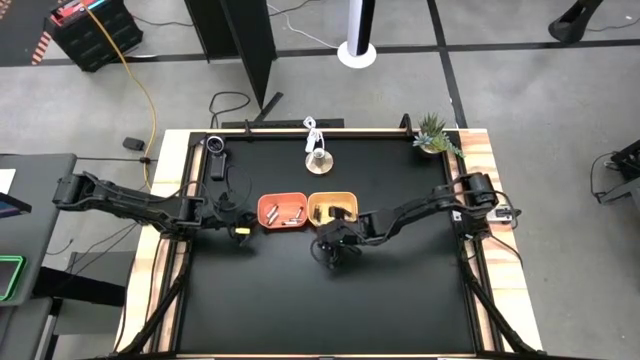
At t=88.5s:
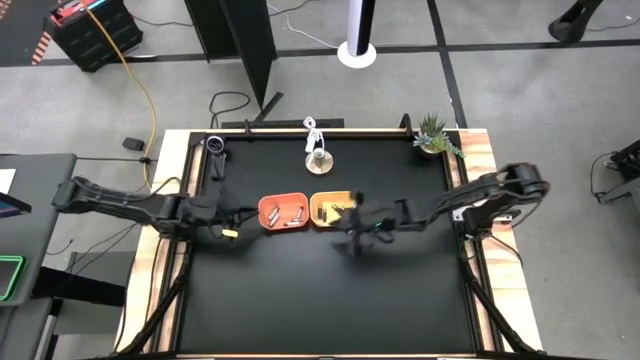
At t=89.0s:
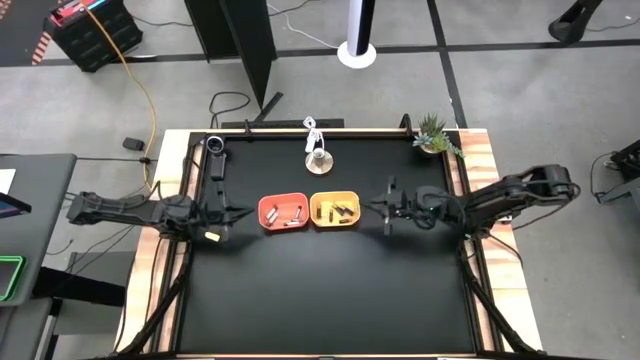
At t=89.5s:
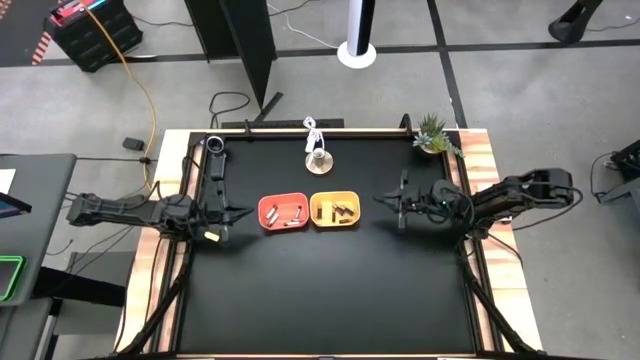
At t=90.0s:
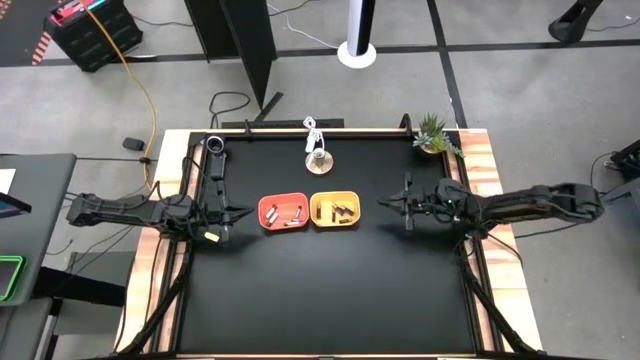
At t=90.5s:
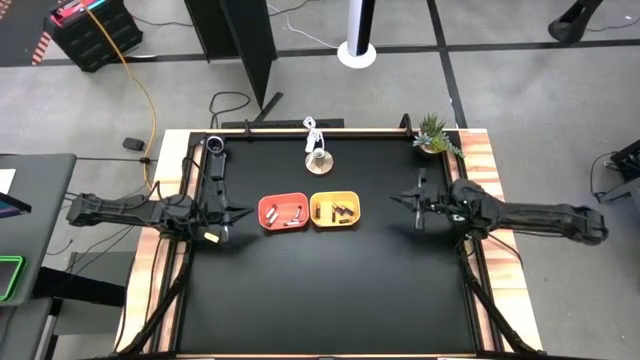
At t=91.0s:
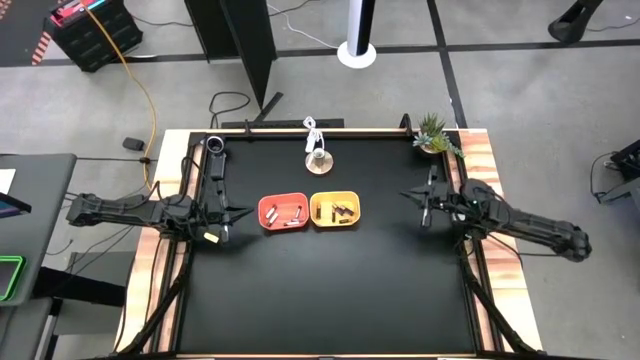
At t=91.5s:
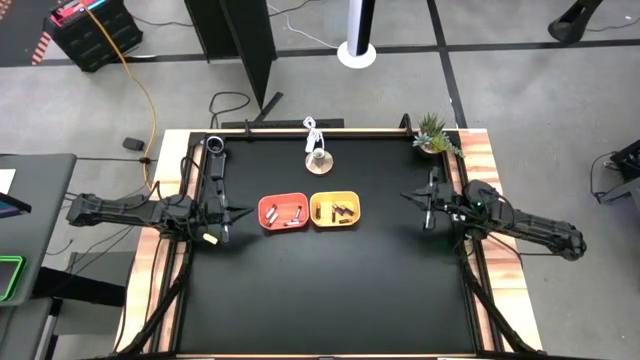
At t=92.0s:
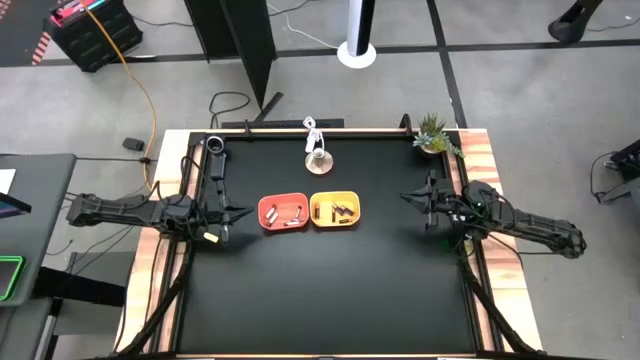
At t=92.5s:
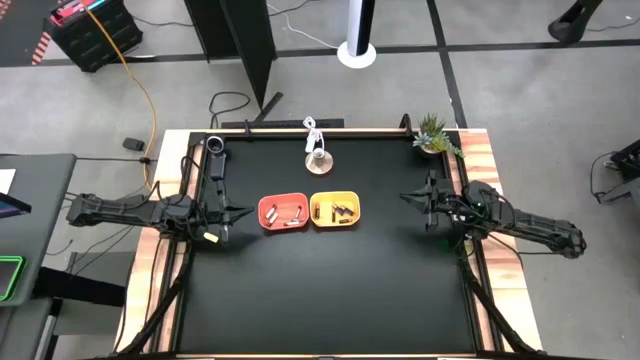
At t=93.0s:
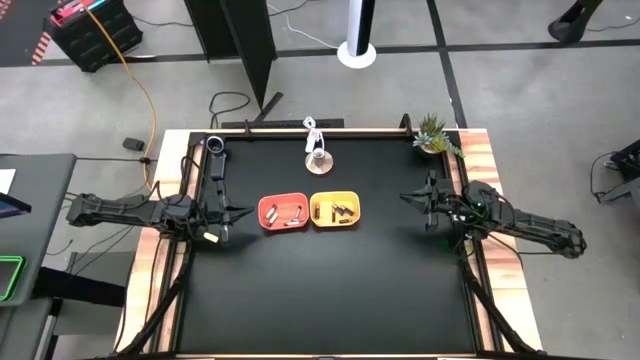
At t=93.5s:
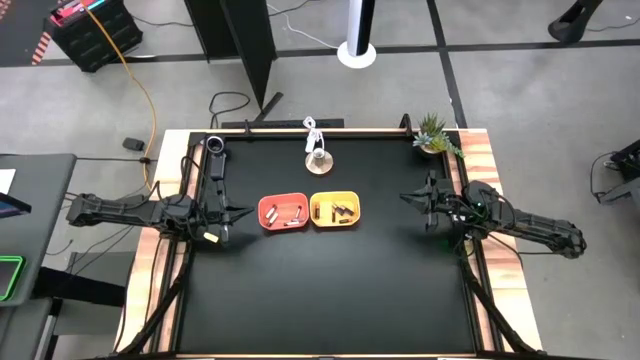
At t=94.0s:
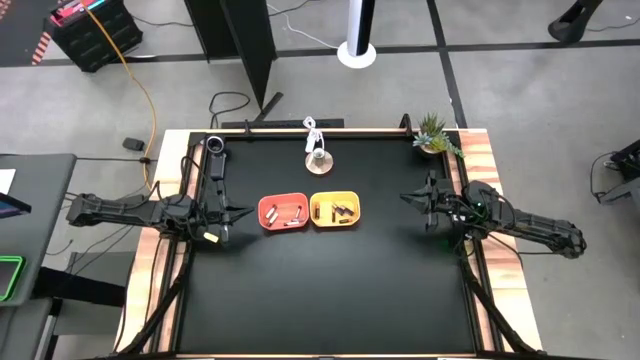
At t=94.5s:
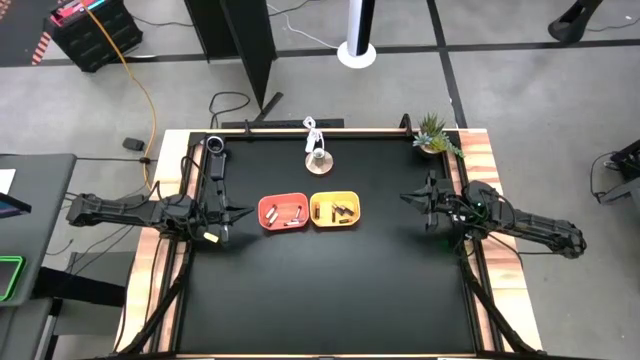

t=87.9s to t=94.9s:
Task: Sort batteries
Return to Home Position

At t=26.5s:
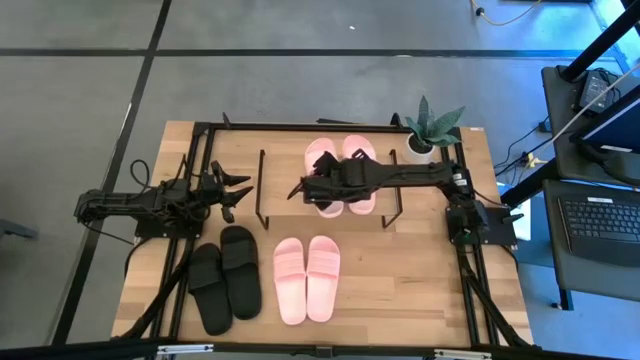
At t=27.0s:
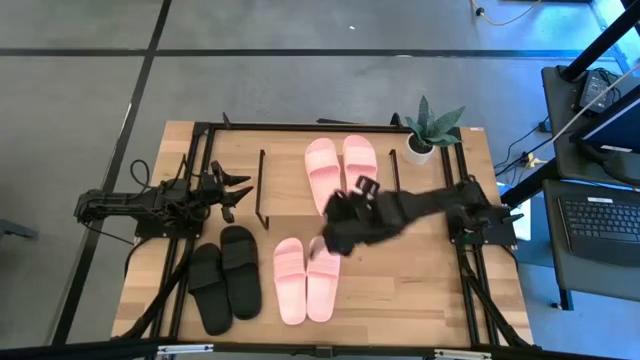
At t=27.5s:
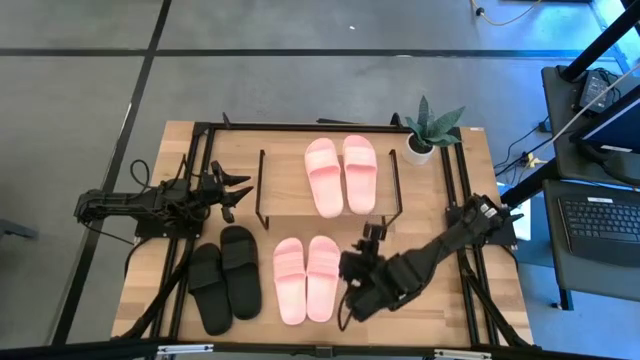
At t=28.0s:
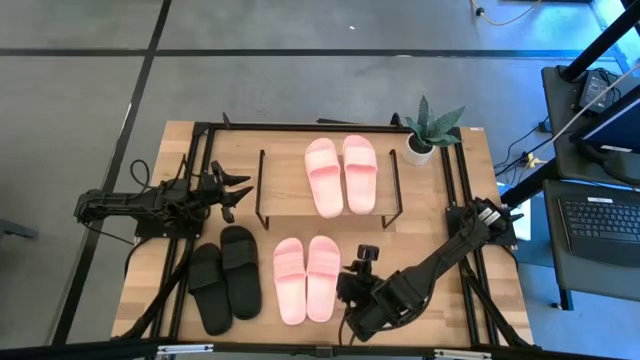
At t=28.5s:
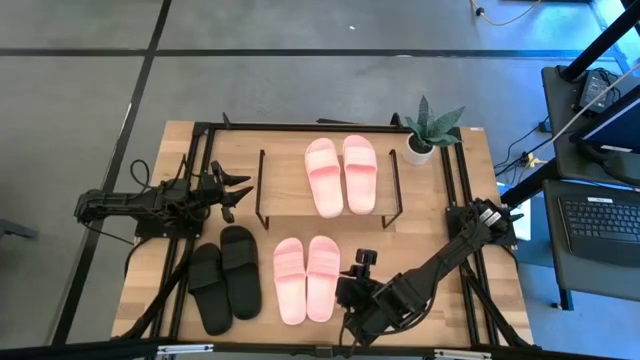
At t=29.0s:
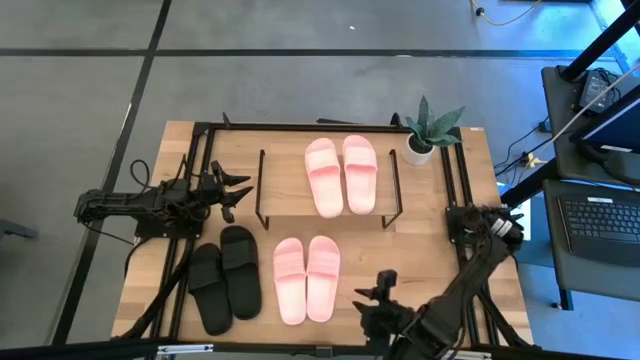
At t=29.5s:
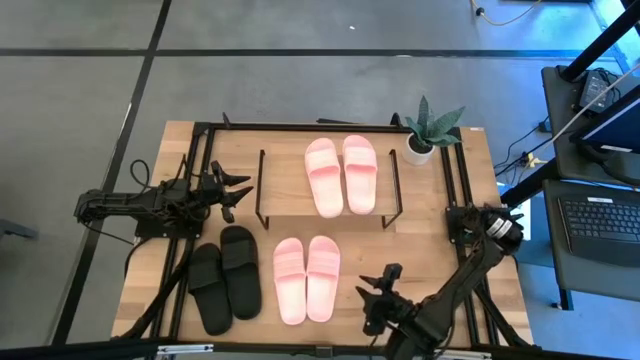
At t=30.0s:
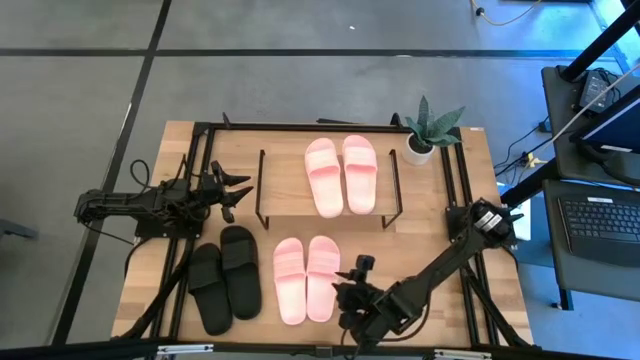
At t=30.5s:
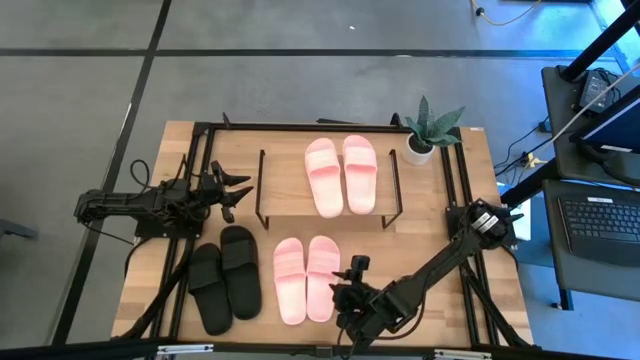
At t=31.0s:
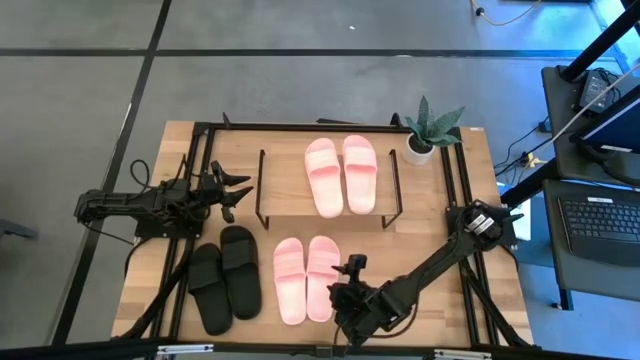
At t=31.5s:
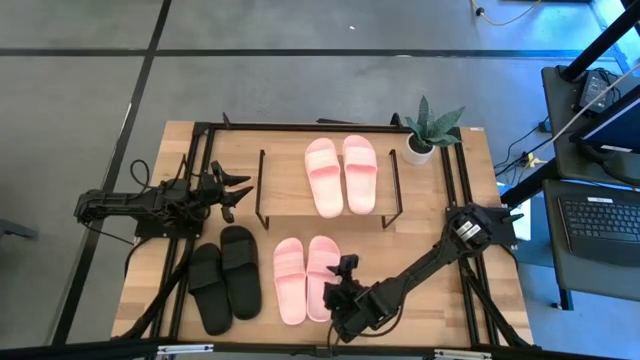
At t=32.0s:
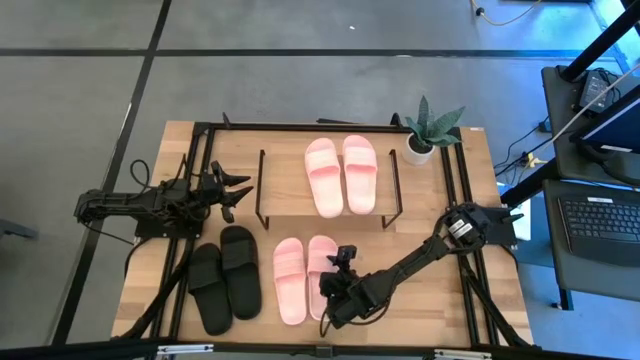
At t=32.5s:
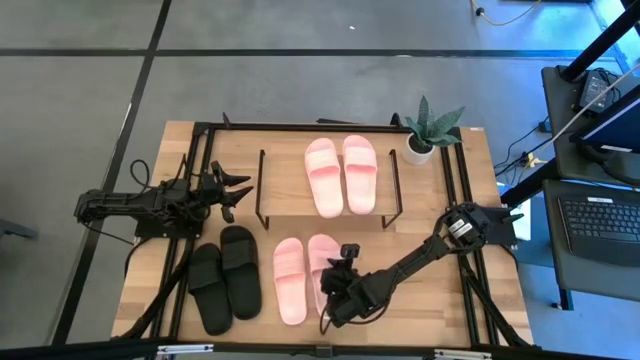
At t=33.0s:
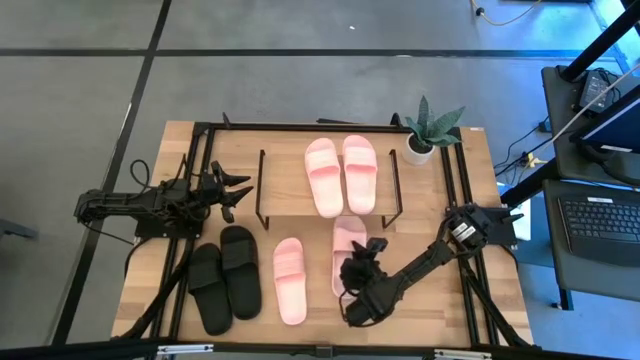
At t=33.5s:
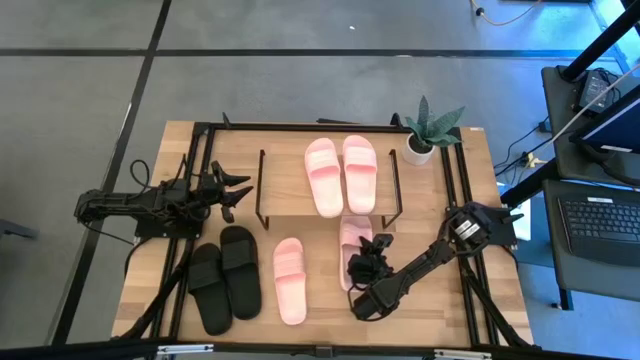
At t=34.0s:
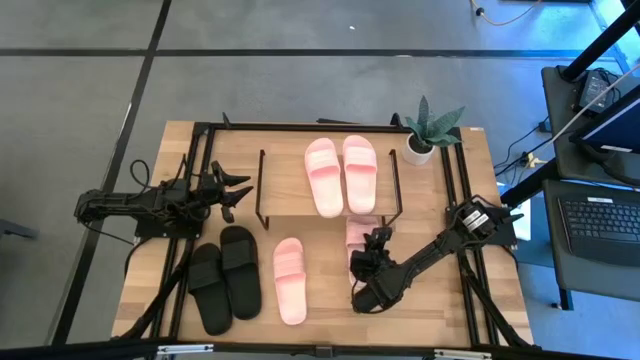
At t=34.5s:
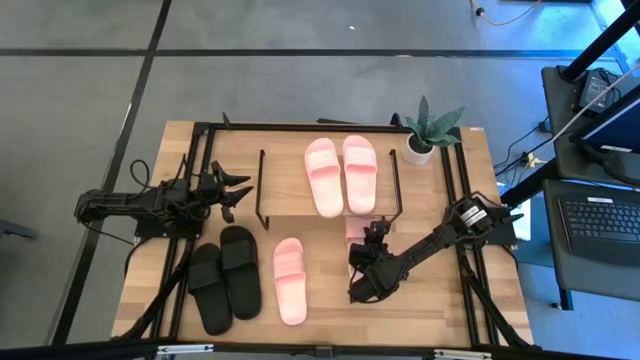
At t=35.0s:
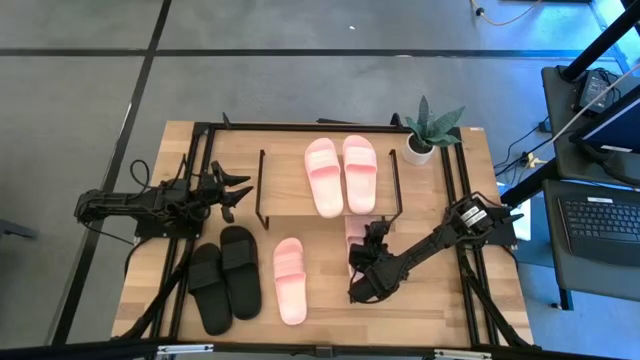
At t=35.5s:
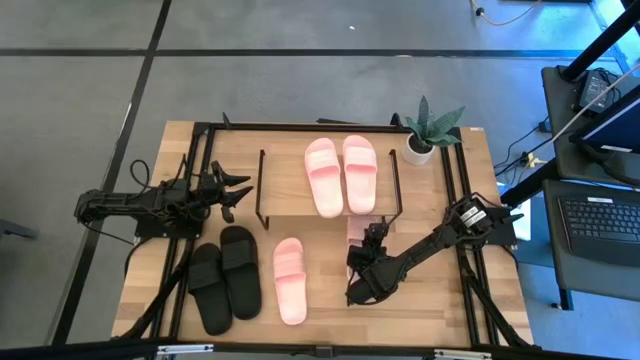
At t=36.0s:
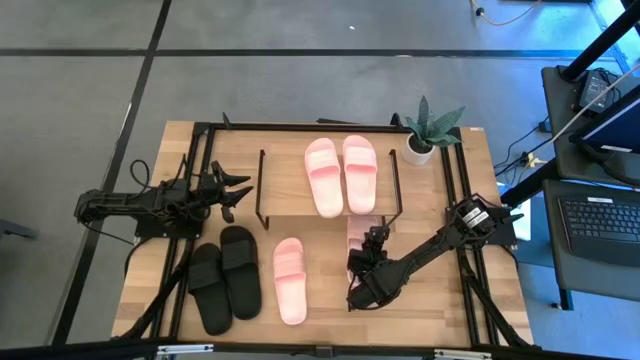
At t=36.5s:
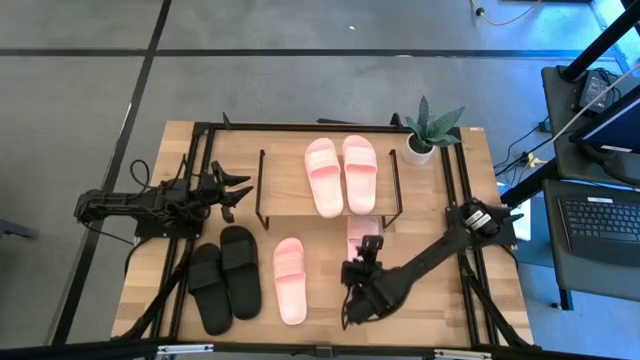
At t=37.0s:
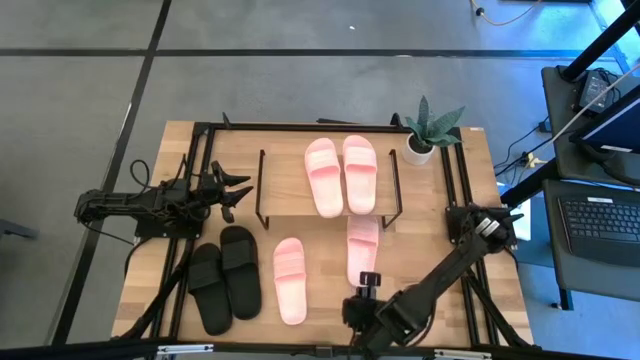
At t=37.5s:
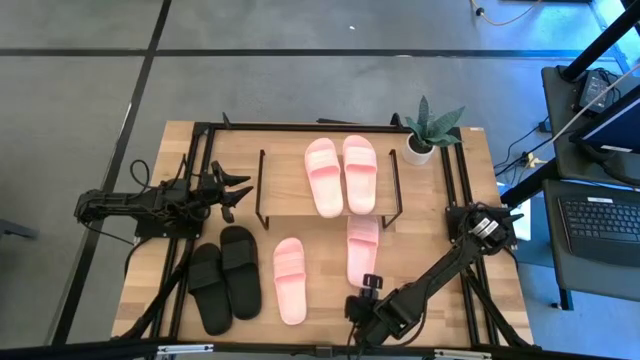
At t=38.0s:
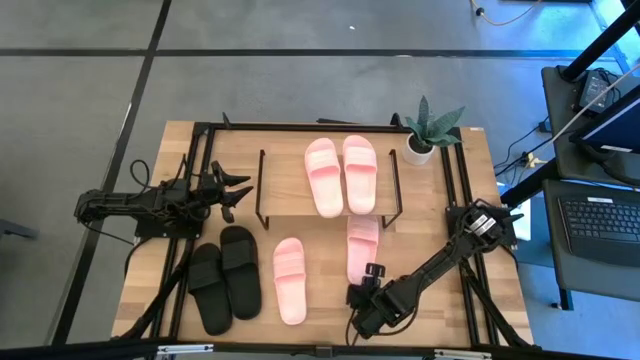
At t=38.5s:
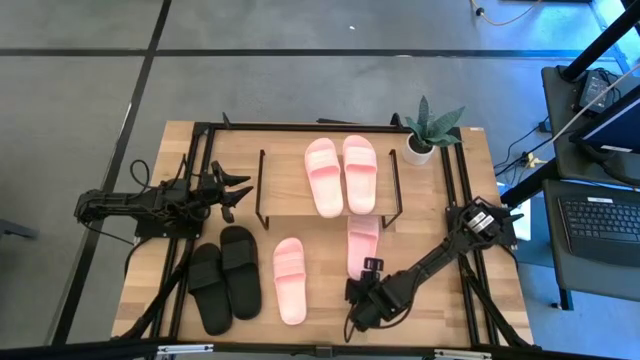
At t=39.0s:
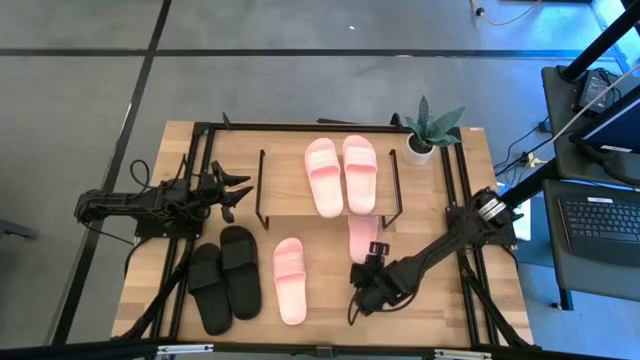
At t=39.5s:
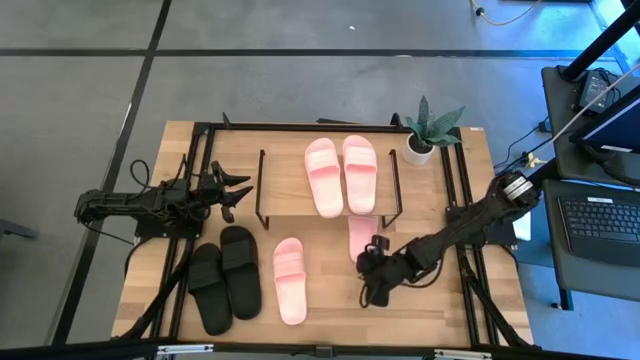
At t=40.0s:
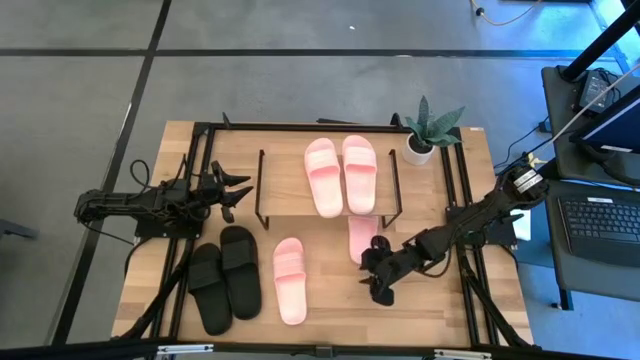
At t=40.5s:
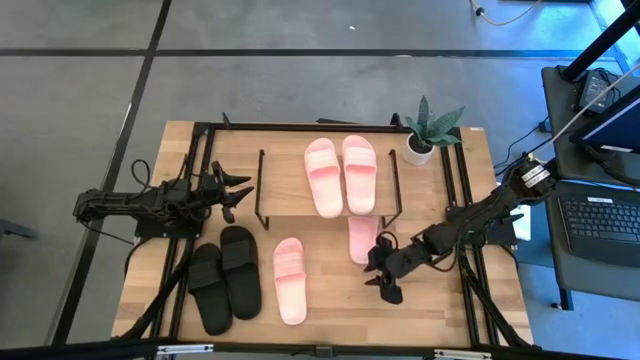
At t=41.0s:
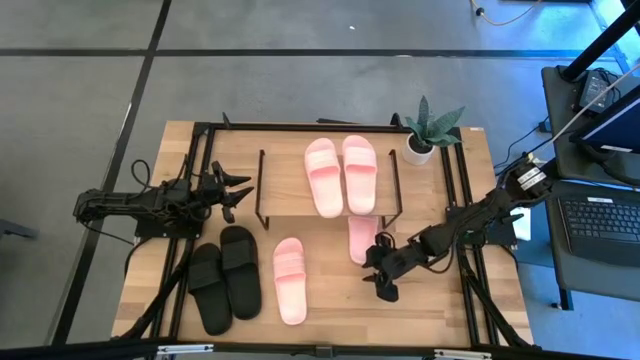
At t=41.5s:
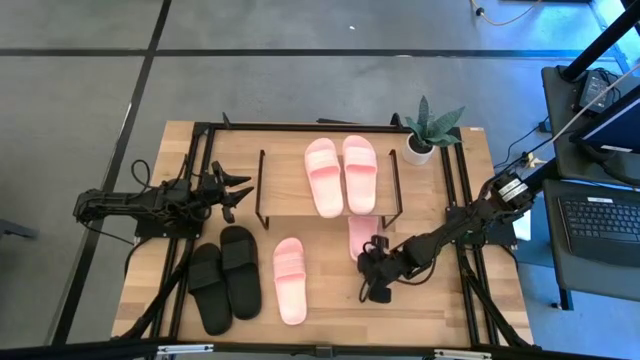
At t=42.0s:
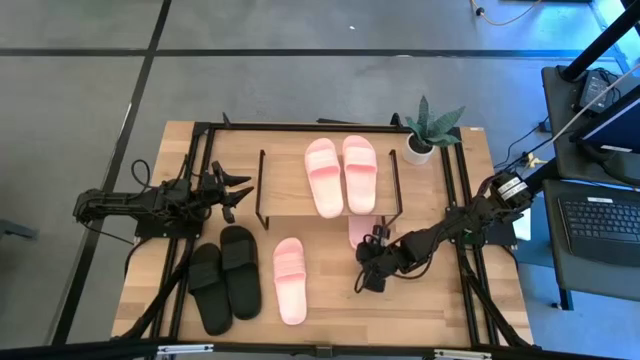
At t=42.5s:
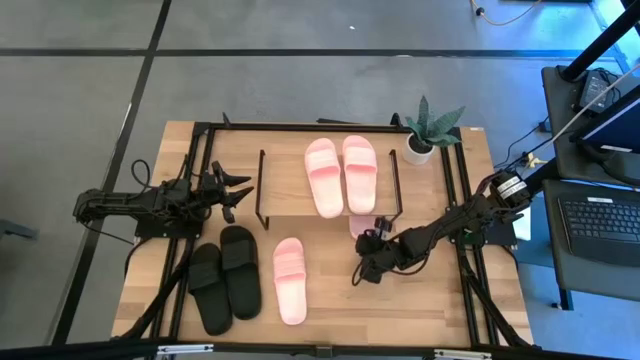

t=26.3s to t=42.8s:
Task: Pick and place slides into the shelf
Move the pink slipper under the shelf
